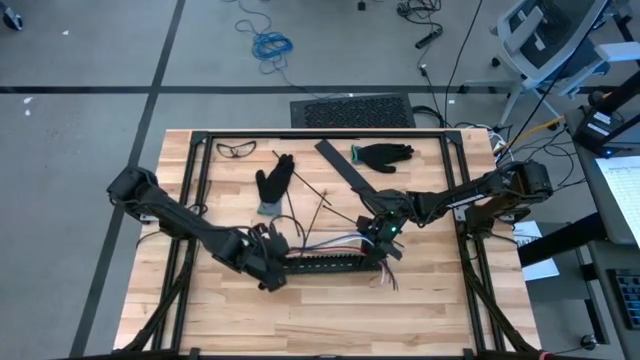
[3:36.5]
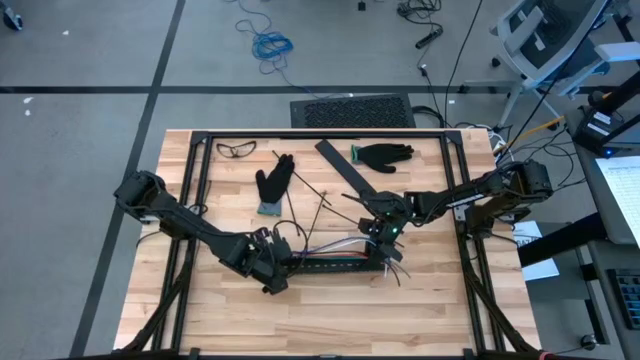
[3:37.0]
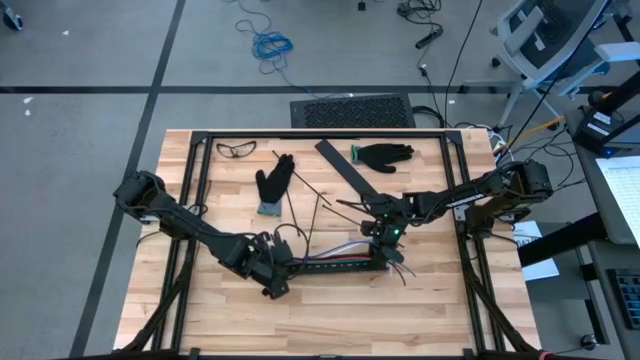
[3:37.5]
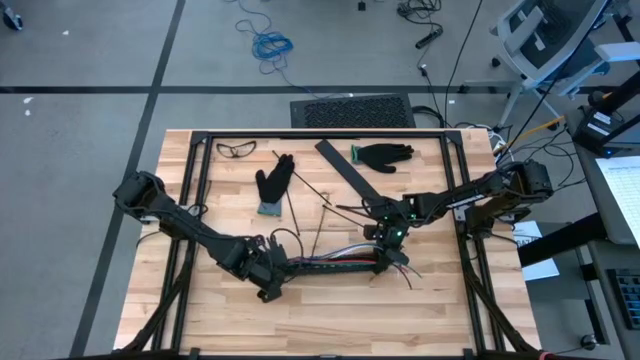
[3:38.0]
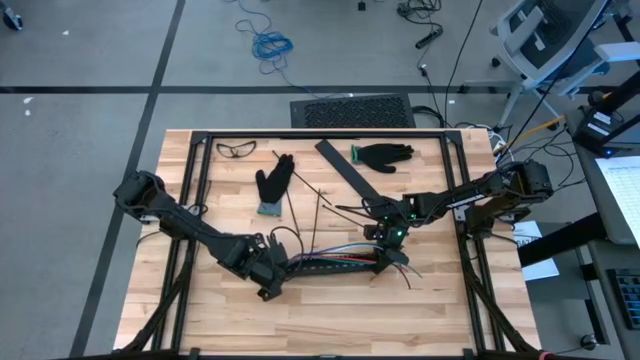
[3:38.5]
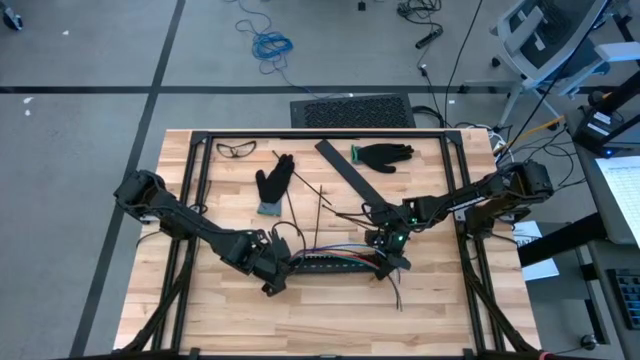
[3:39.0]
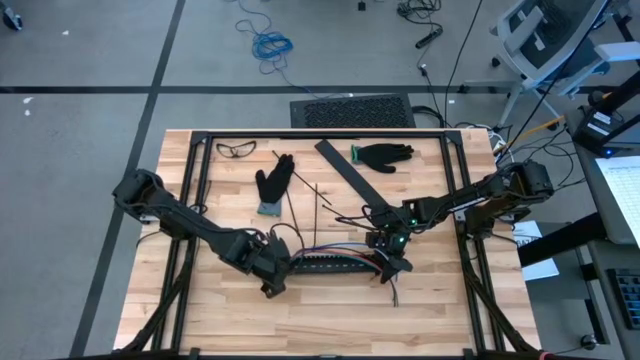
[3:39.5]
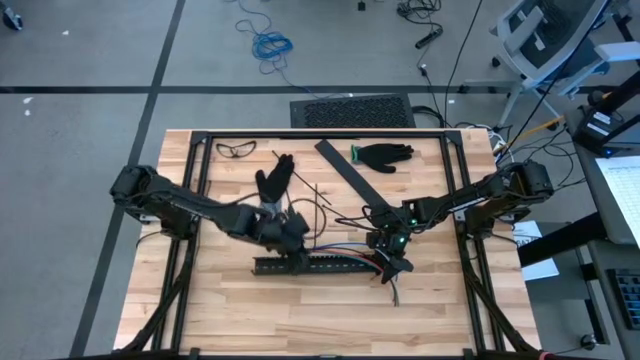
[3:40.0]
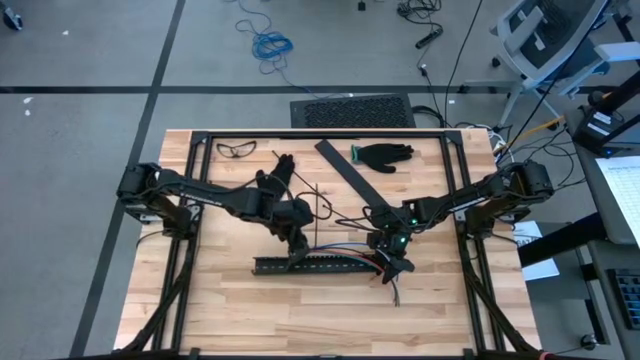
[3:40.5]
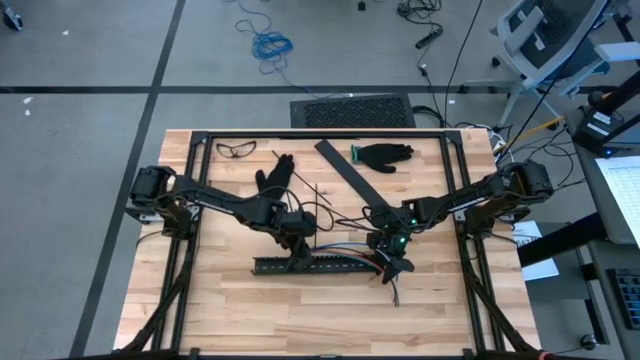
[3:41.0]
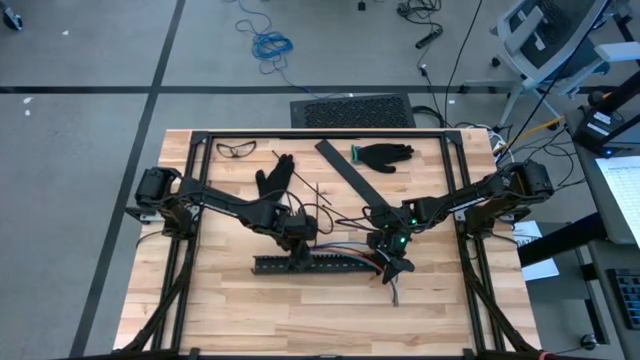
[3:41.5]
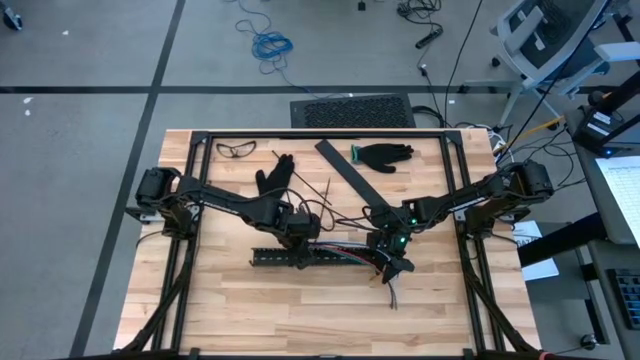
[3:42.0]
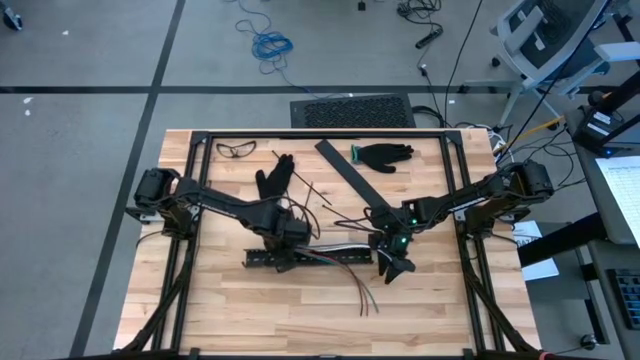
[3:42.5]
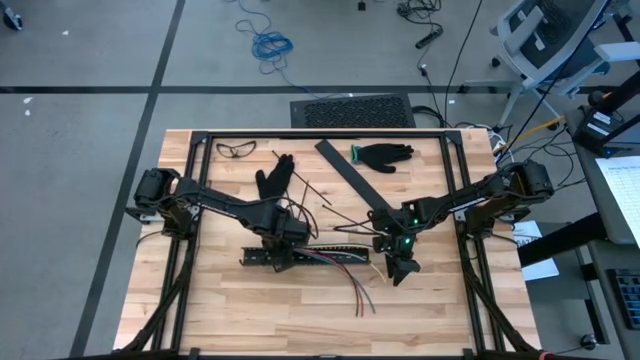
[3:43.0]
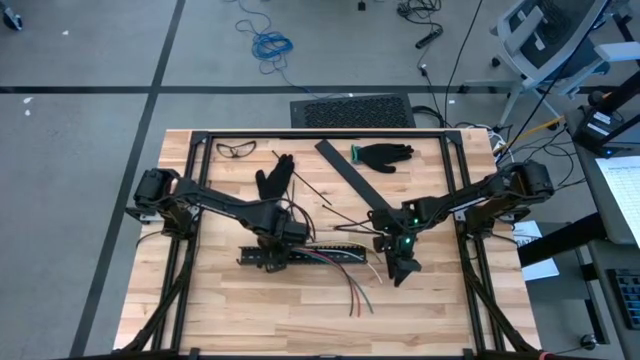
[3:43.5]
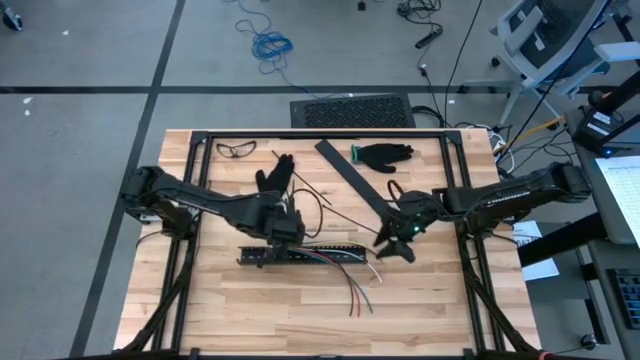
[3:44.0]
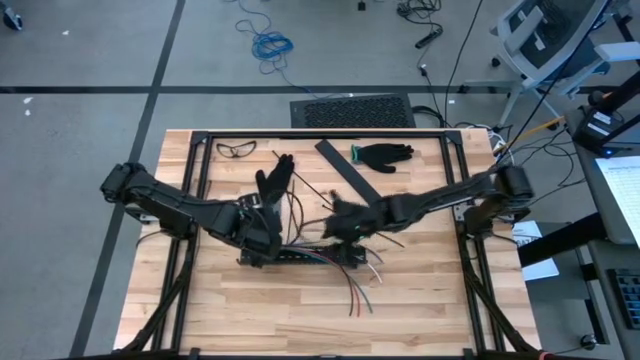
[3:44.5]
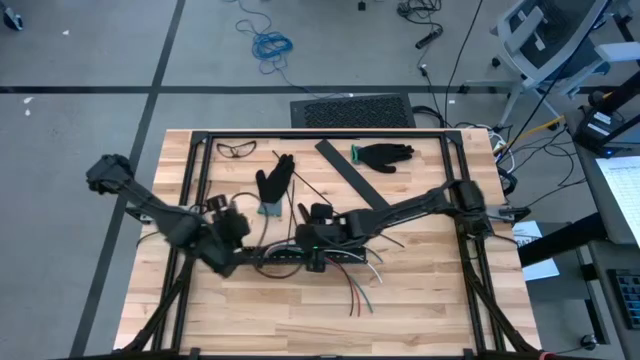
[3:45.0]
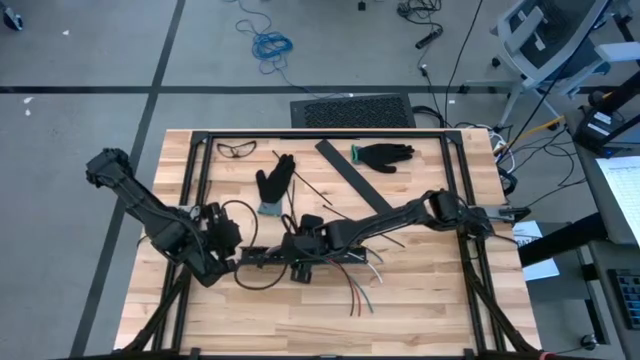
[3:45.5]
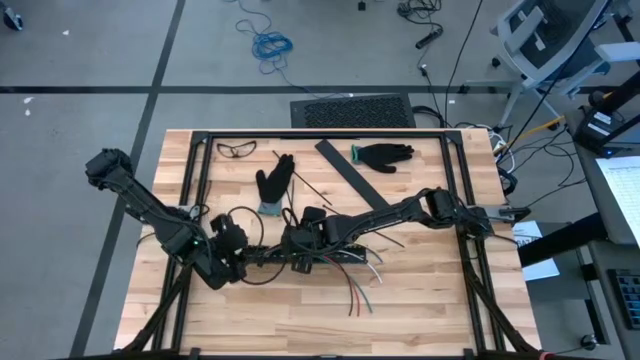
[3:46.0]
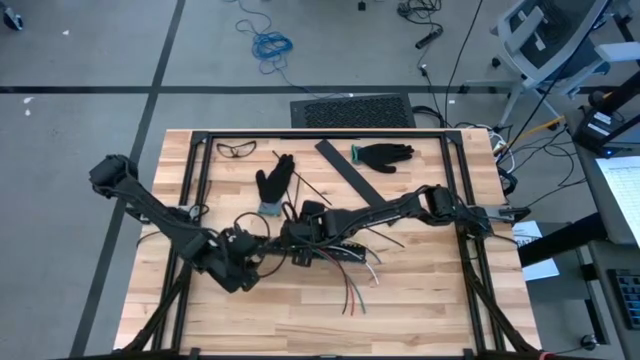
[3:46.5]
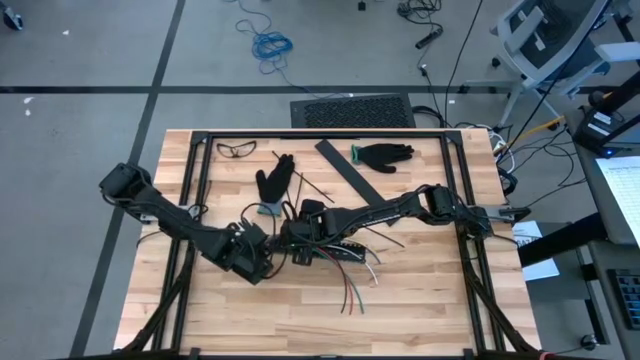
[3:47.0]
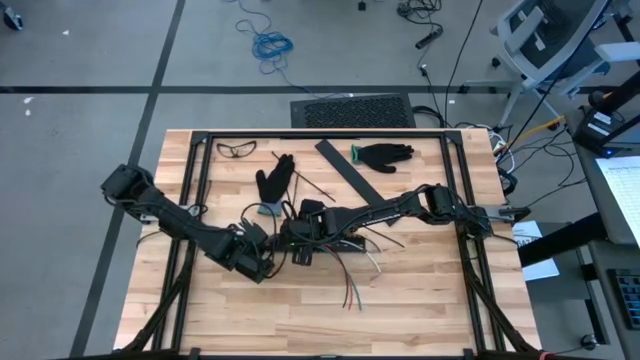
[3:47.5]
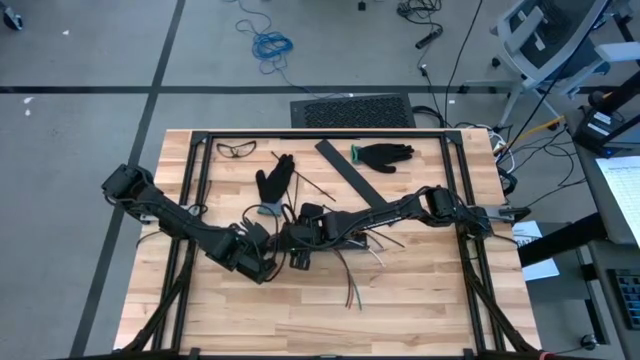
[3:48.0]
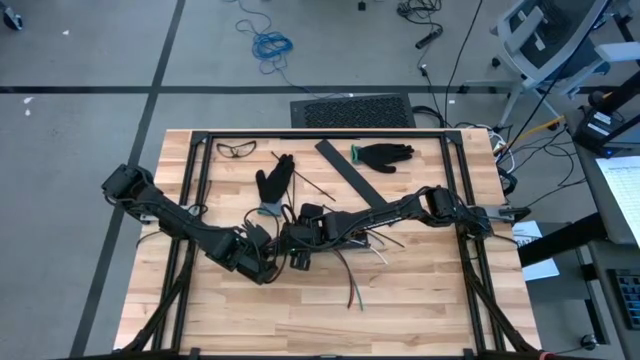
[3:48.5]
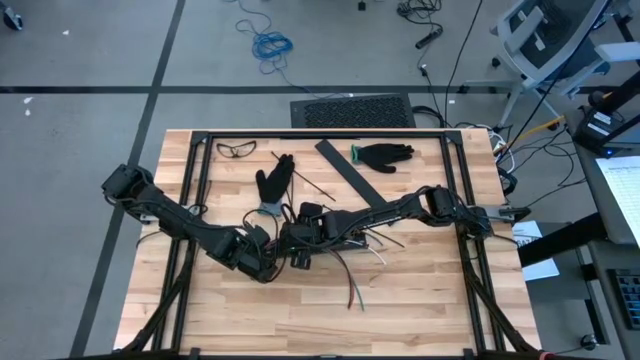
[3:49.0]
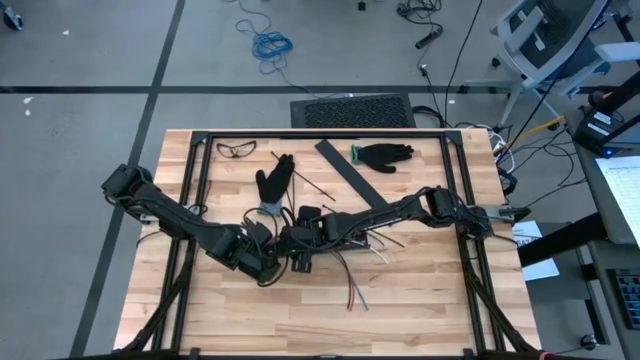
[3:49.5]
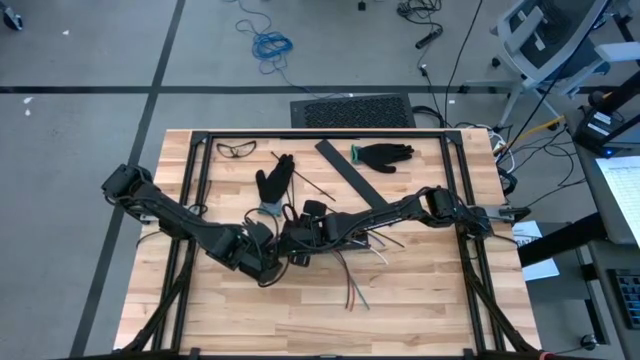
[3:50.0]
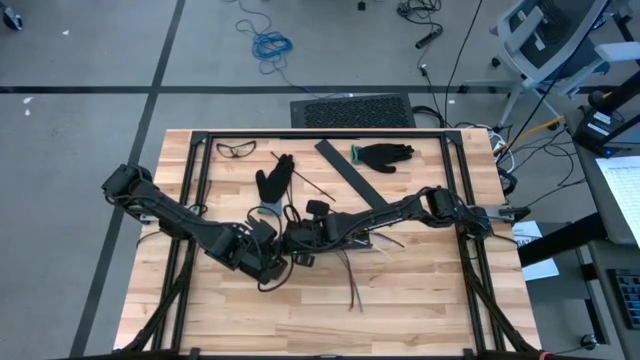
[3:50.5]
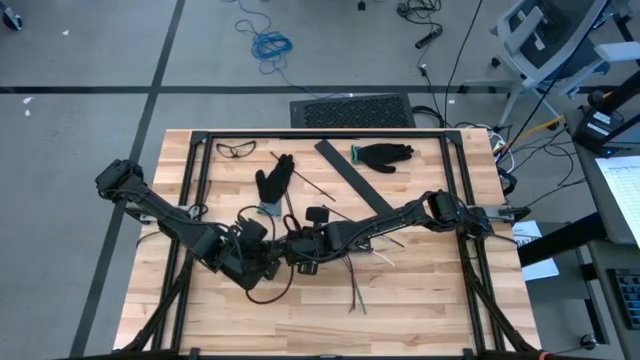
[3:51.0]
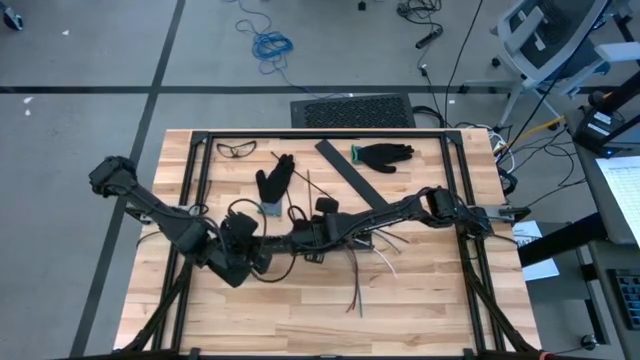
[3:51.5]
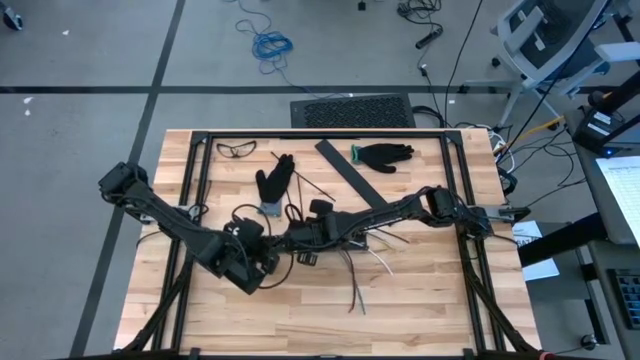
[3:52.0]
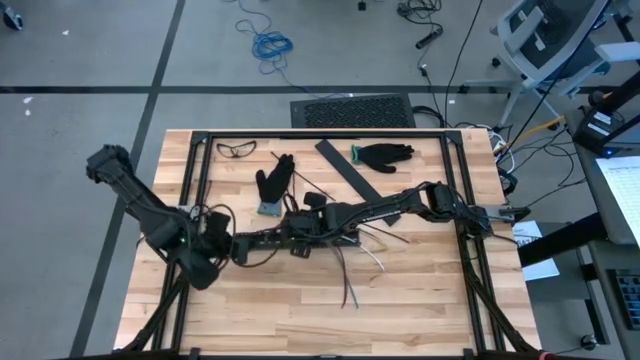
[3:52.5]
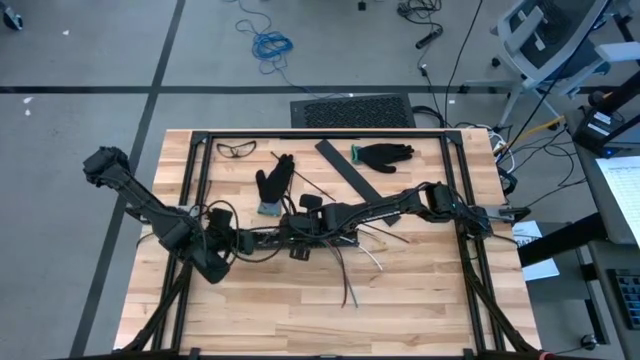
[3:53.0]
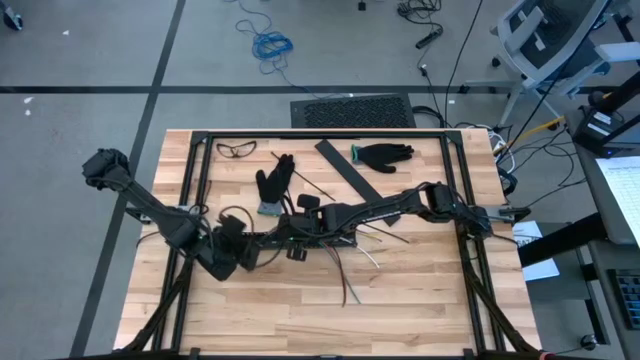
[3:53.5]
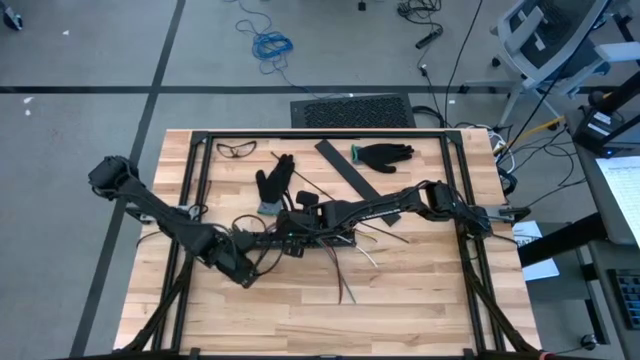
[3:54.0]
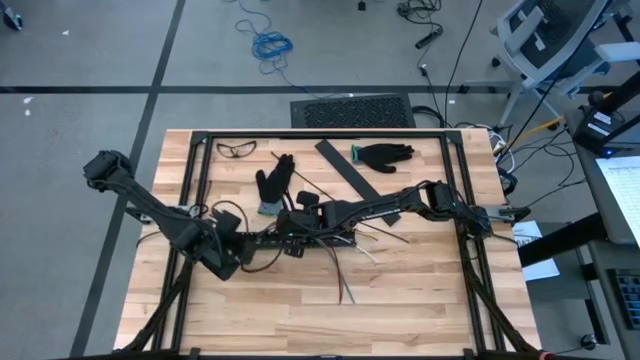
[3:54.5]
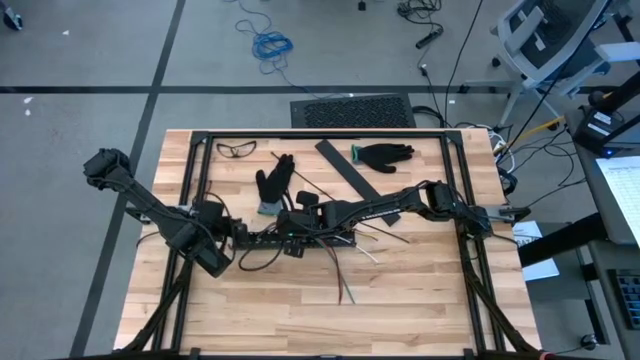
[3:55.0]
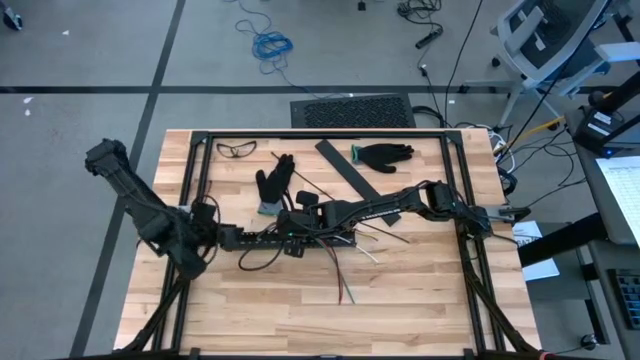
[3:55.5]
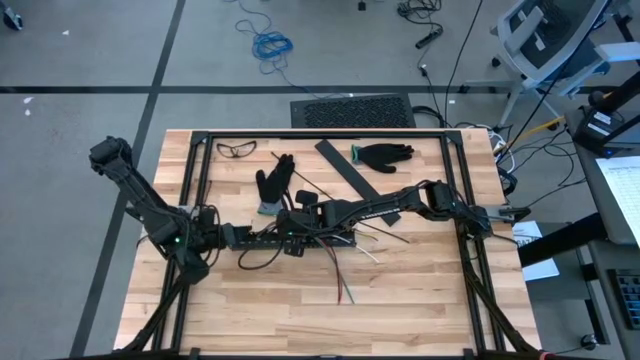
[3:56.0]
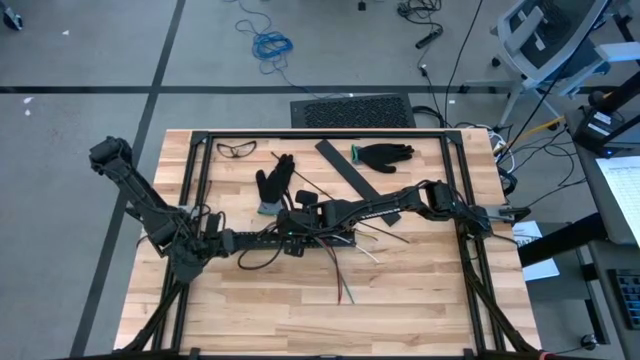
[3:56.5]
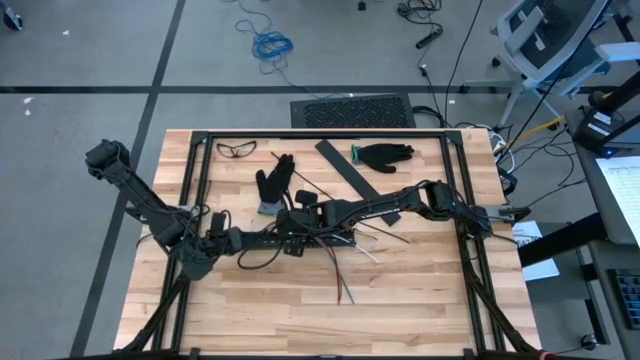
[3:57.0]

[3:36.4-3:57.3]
Task: Ziptie cables
Put the ziptied cables in the black cable duct
